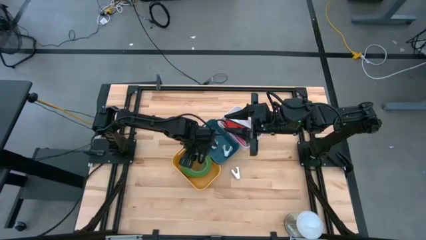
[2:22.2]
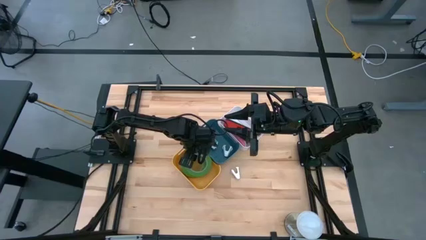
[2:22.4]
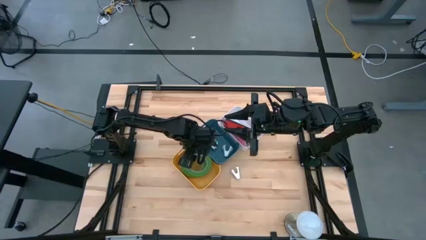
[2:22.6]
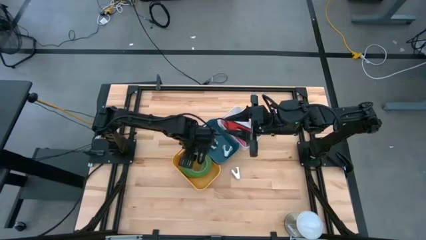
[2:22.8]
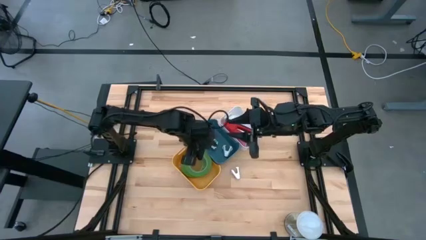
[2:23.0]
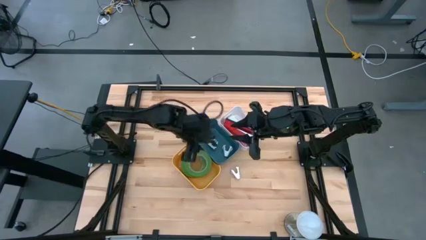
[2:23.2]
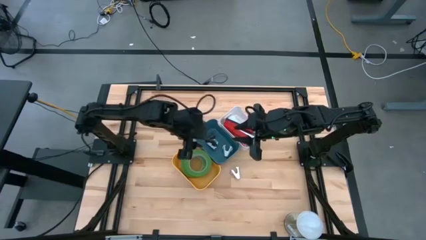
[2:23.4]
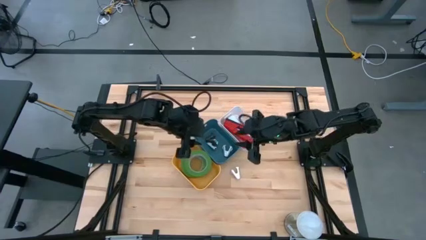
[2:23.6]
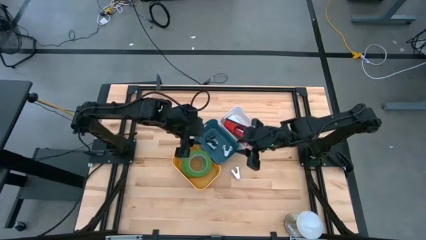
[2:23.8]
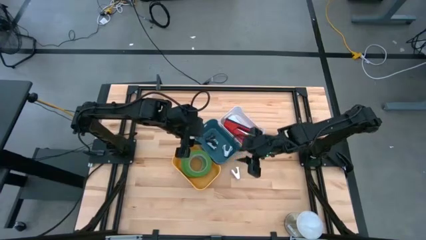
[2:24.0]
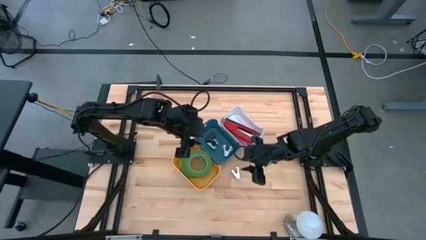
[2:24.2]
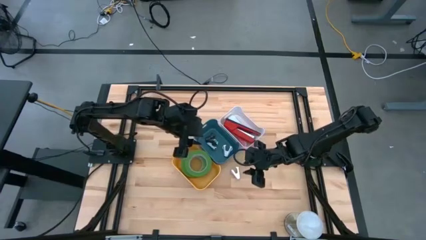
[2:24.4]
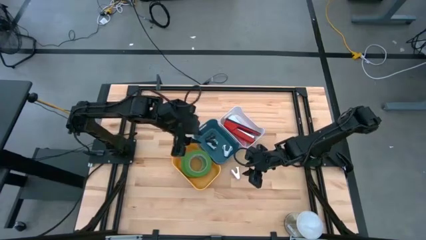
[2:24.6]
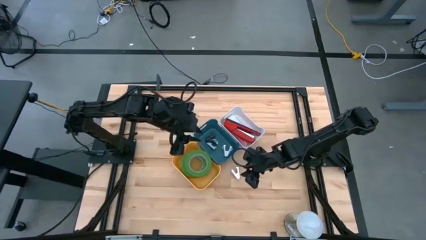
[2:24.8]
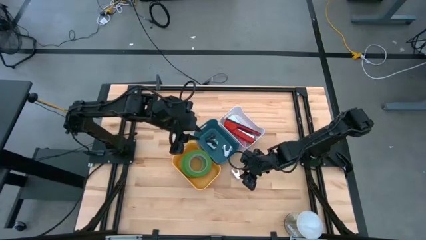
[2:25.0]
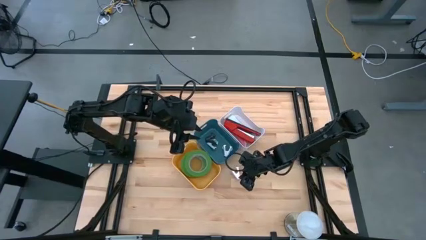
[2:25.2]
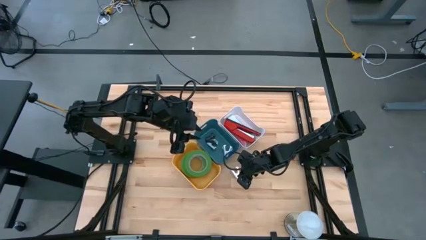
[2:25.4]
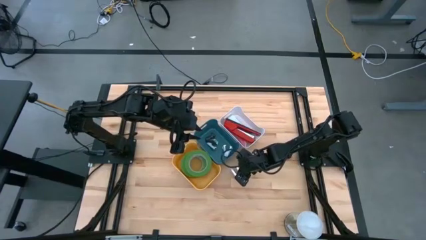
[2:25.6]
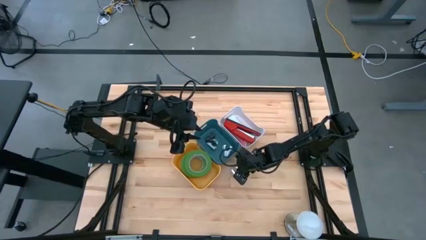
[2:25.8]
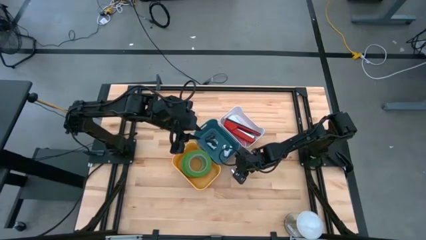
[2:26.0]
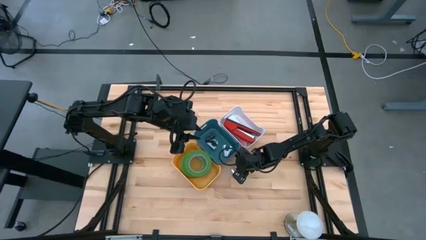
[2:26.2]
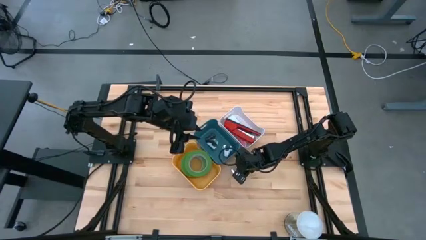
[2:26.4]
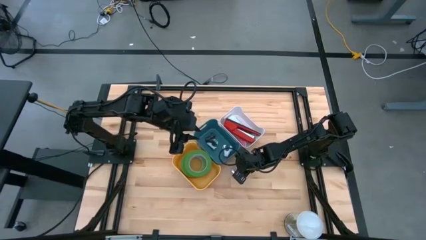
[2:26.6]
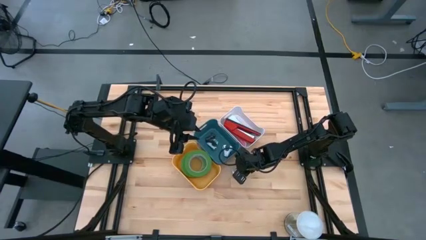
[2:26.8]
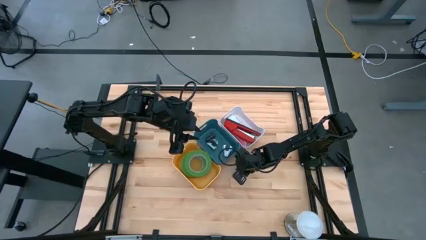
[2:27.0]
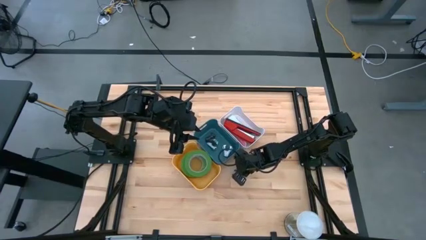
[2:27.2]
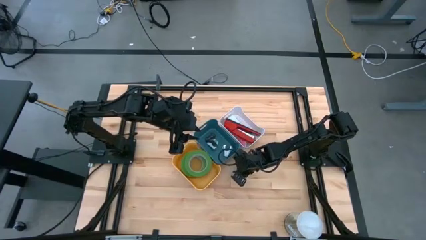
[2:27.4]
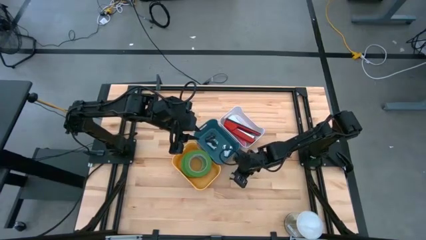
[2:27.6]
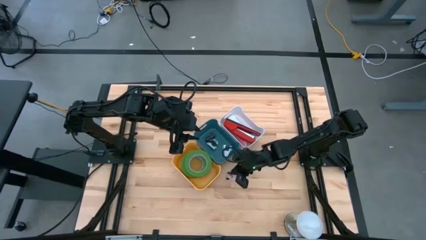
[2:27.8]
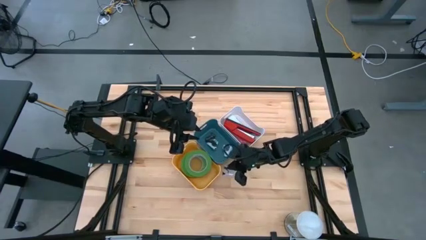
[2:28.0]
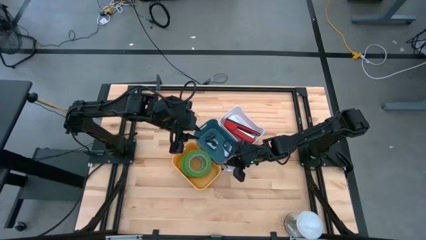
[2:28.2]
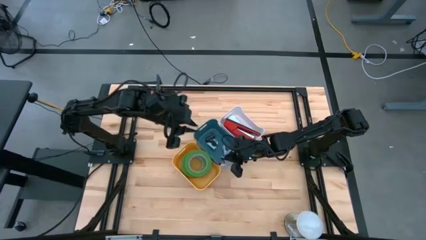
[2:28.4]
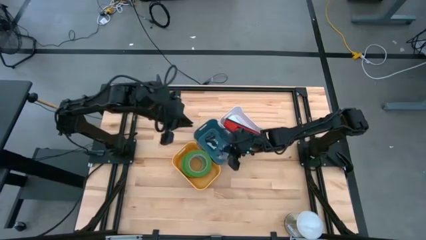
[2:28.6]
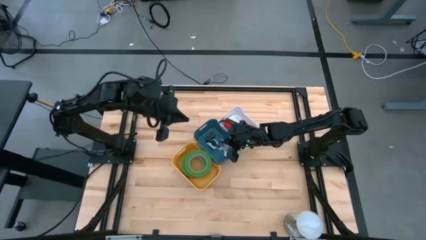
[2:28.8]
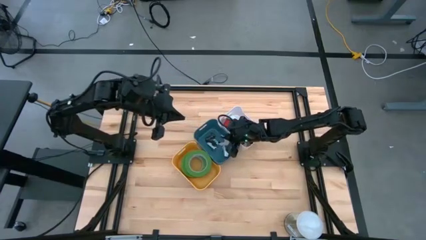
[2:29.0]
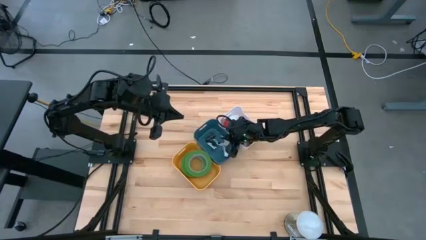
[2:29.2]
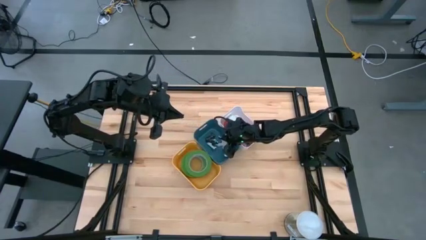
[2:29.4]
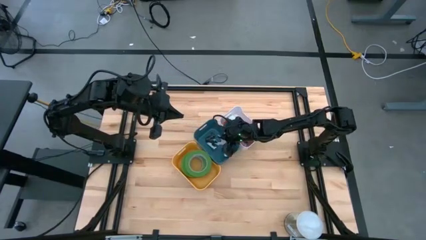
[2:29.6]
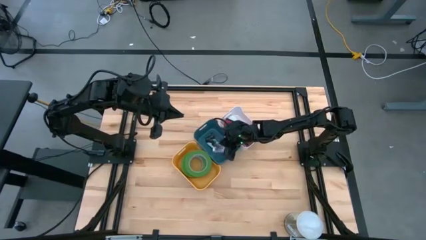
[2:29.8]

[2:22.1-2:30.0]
Task: Pick and place Stapler, Stapler remover, tape
Put the purple staple remover into the blue bin

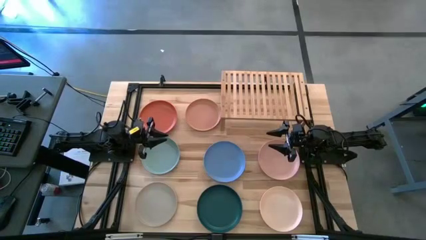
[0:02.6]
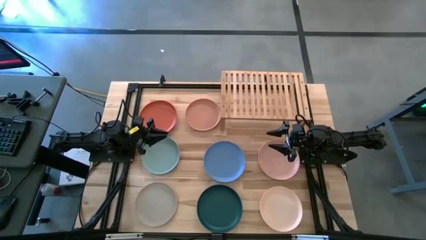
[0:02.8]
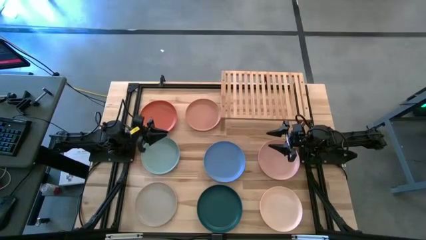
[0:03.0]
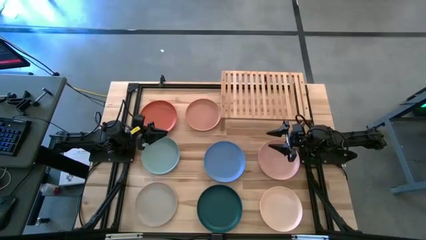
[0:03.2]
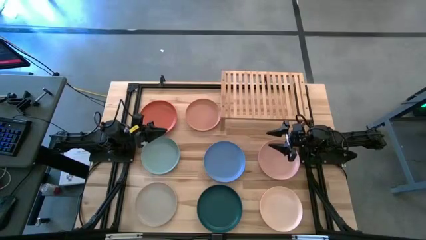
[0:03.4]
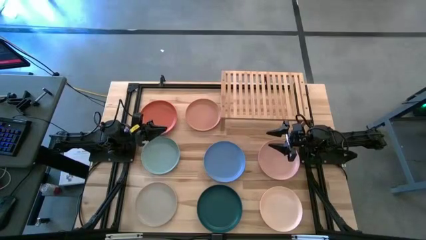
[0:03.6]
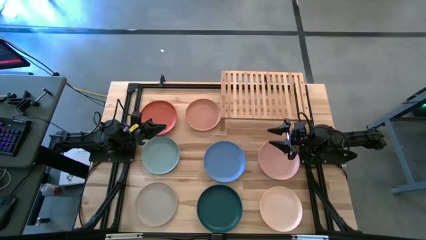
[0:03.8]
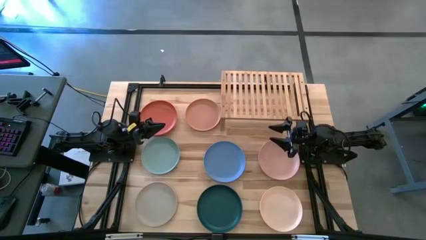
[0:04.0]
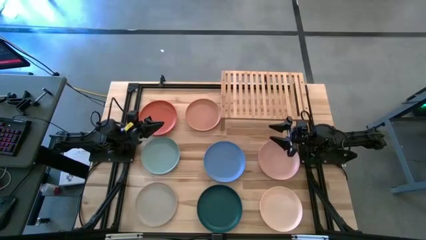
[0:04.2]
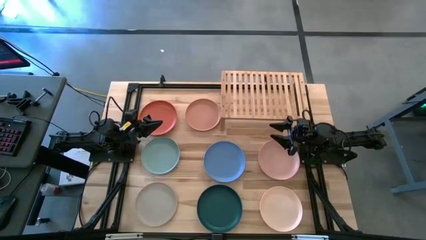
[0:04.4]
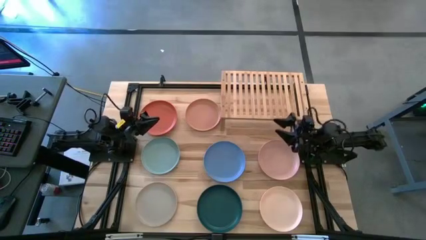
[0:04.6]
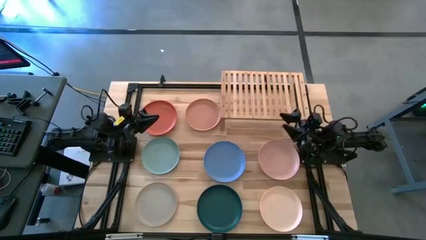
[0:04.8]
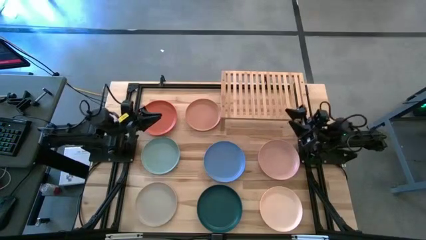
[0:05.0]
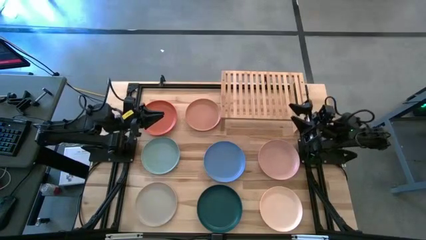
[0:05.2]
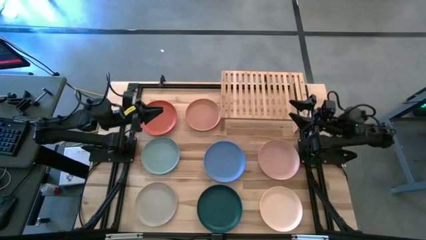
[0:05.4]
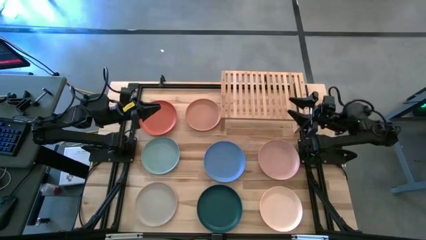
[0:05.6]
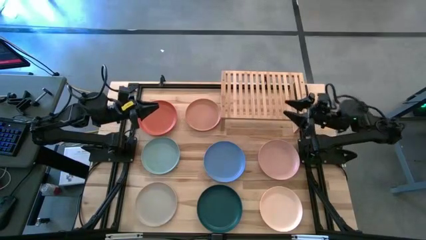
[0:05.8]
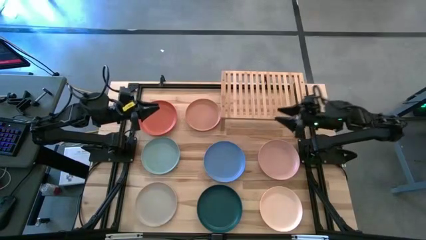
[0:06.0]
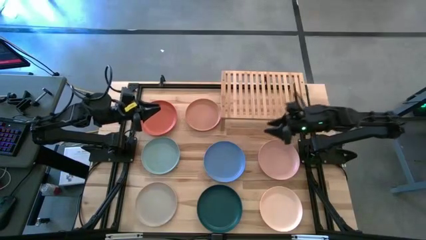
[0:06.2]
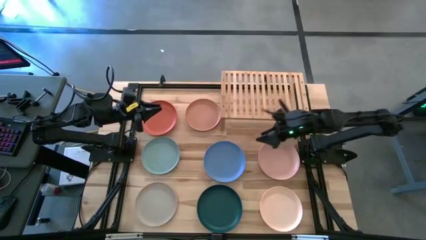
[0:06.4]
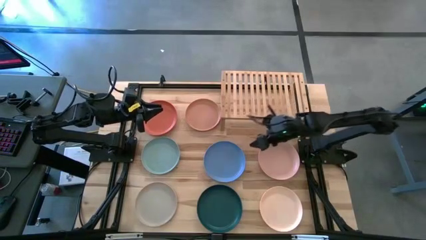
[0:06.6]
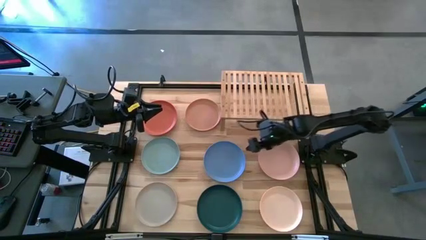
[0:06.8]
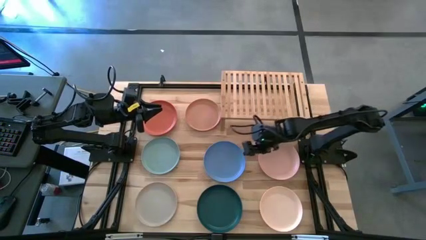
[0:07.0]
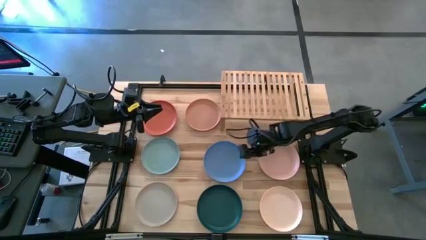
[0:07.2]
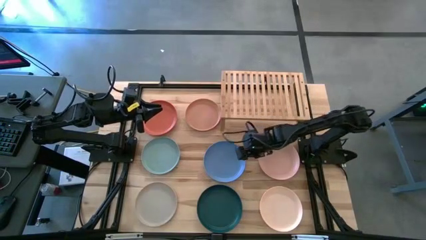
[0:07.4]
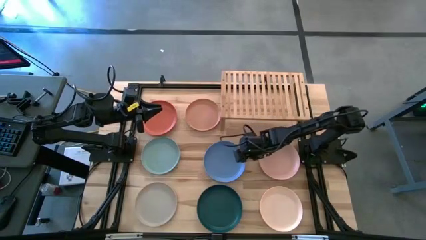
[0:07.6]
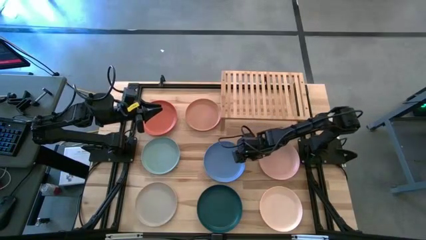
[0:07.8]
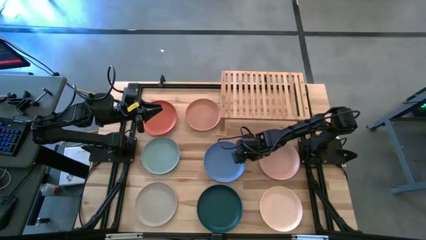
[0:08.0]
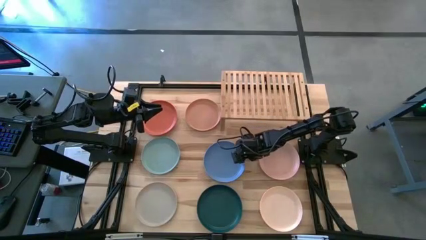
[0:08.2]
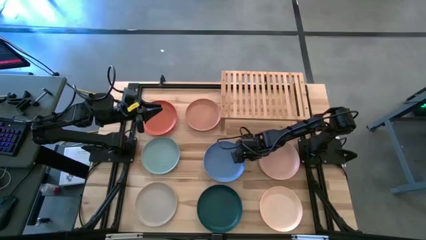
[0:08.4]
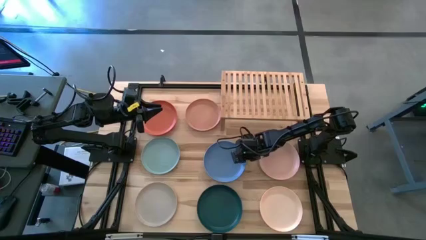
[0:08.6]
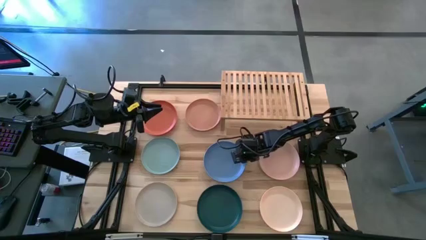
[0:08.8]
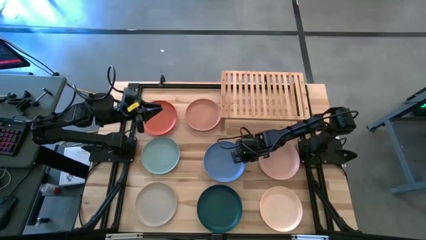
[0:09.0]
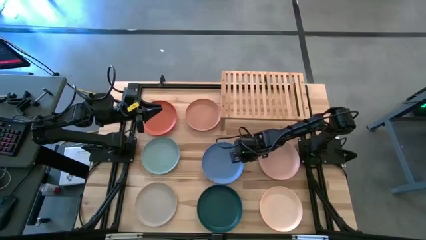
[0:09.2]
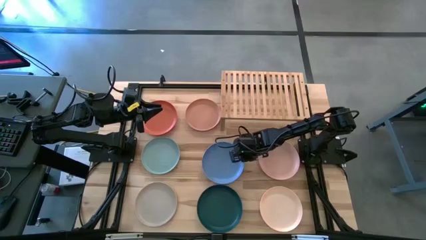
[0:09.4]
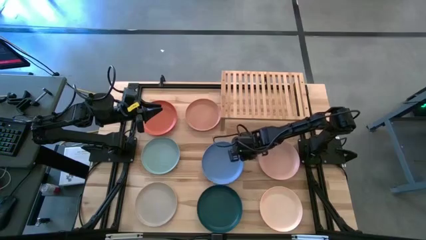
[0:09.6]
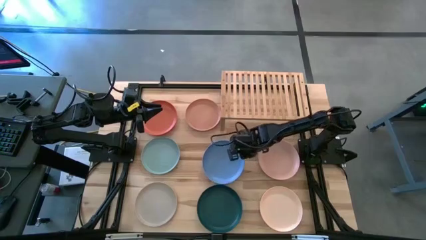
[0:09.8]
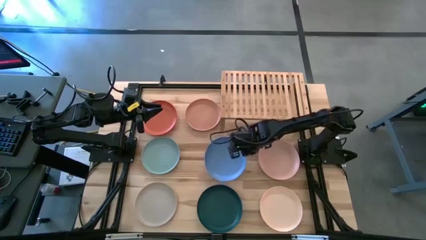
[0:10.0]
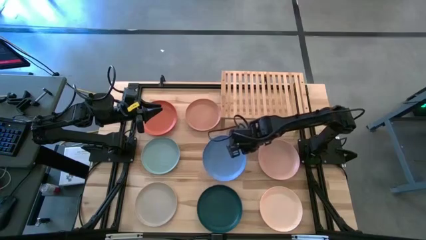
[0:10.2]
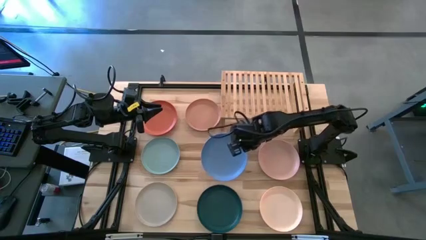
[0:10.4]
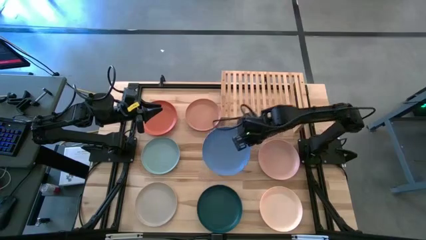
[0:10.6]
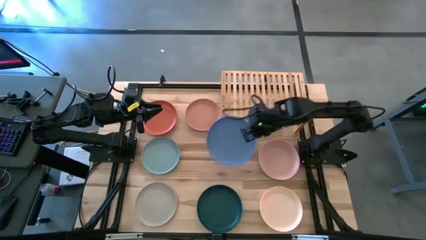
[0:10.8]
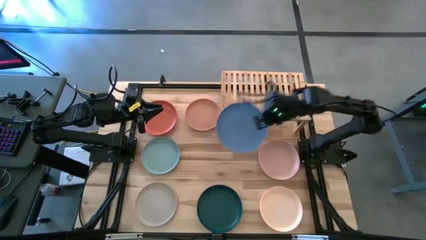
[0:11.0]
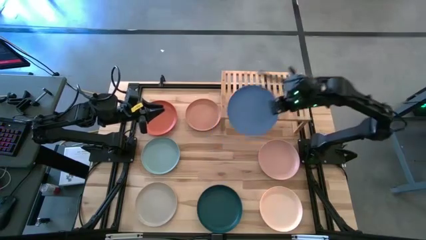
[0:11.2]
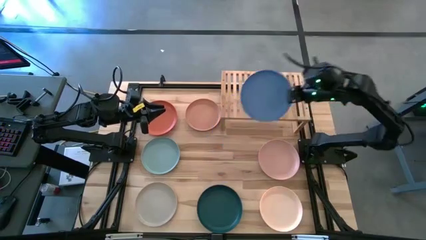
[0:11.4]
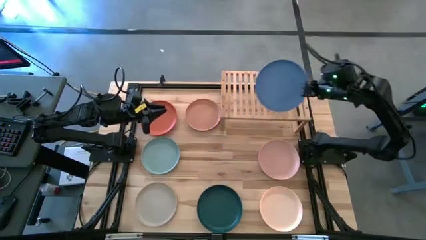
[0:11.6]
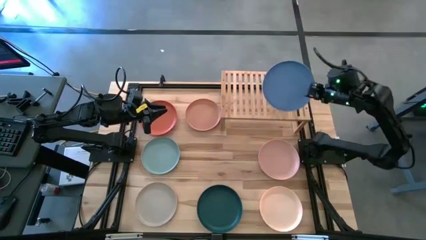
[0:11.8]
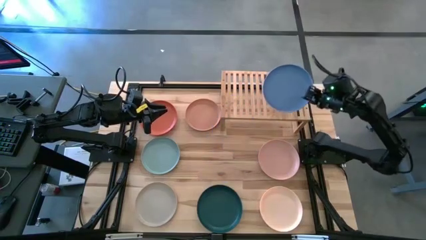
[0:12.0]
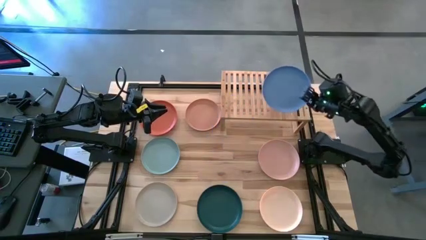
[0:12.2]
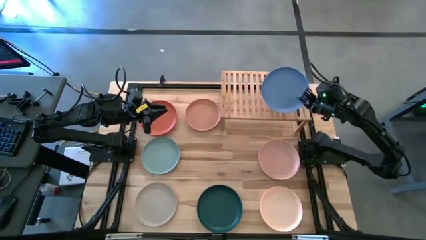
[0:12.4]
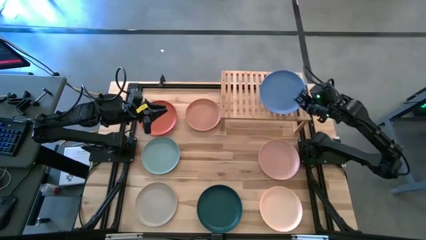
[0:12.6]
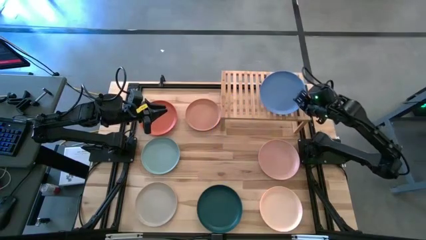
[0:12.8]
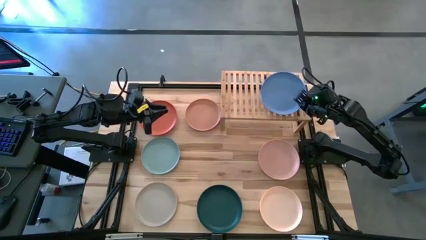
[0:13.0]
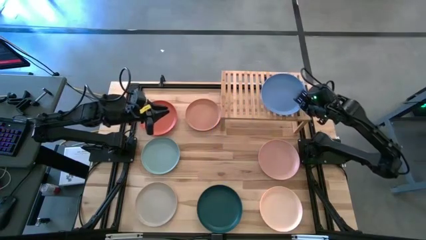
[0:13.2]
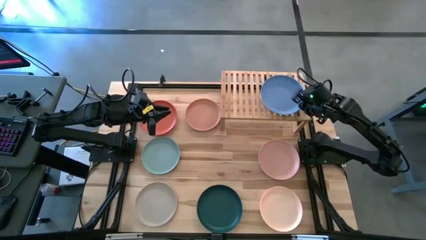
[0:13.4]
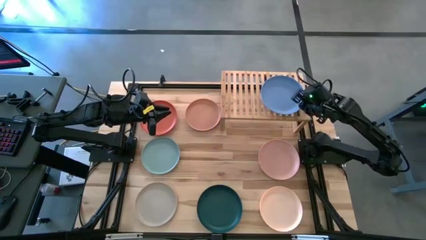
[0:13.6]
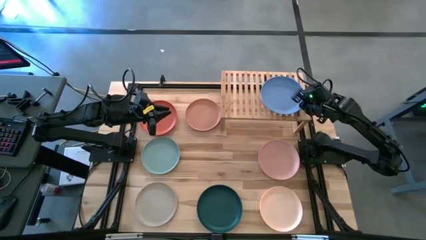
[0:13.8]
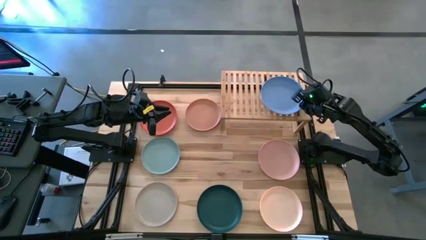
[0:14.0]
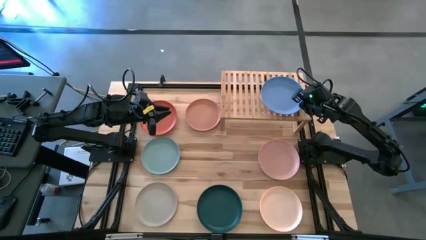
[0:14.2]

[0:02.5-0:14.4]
Task: Place and stack plates onto a shelf
Put the blue plate on the shelf
